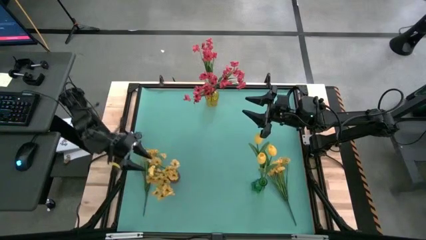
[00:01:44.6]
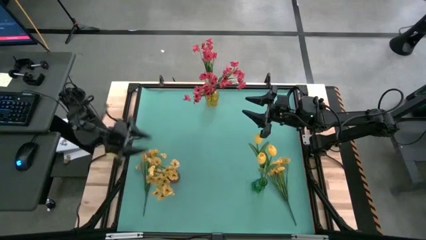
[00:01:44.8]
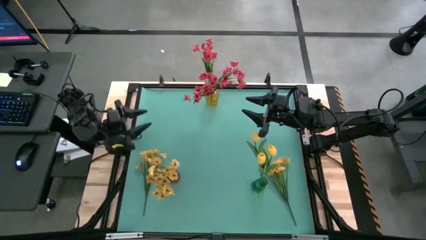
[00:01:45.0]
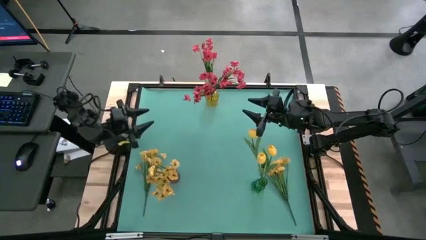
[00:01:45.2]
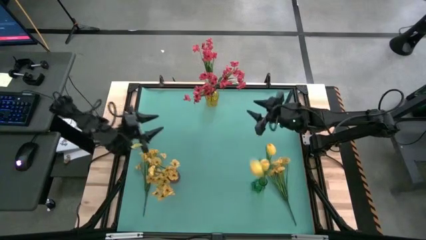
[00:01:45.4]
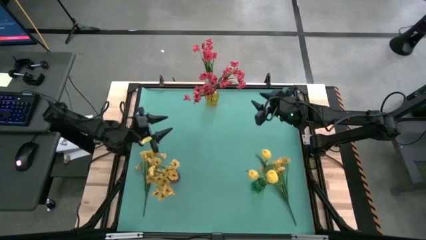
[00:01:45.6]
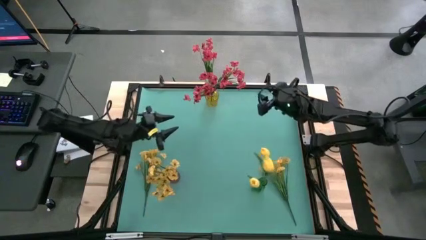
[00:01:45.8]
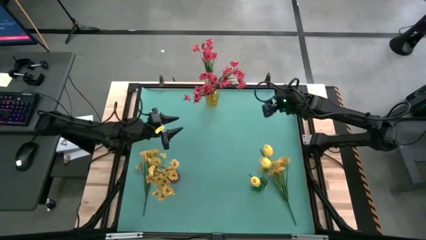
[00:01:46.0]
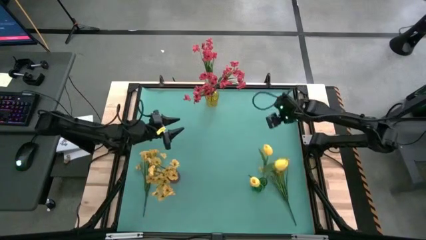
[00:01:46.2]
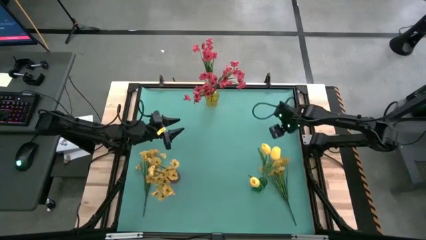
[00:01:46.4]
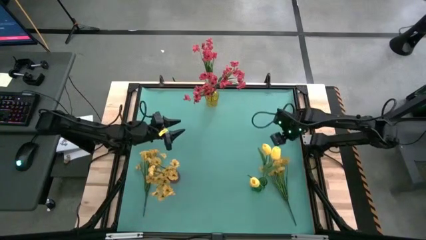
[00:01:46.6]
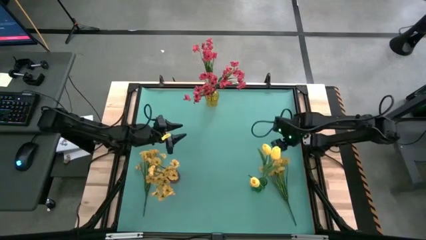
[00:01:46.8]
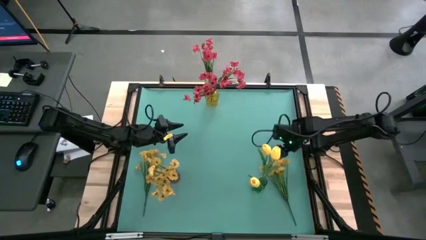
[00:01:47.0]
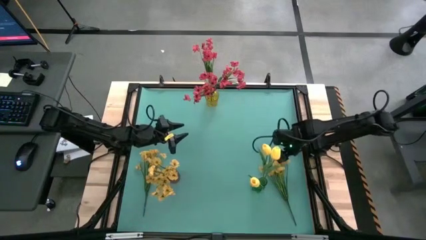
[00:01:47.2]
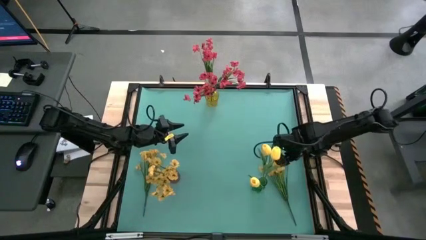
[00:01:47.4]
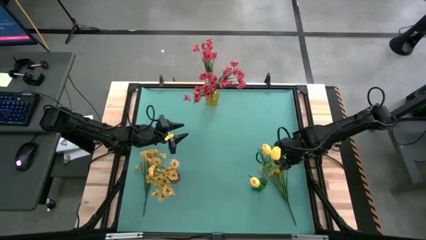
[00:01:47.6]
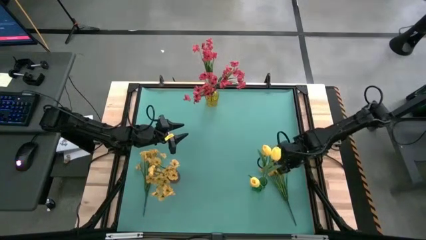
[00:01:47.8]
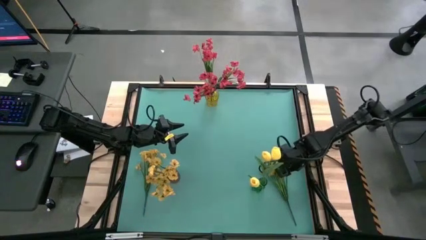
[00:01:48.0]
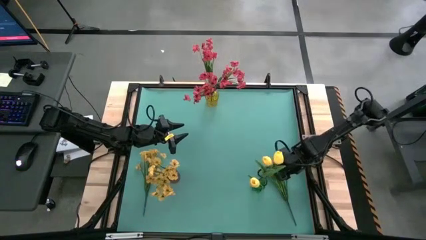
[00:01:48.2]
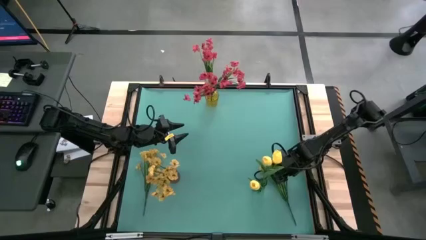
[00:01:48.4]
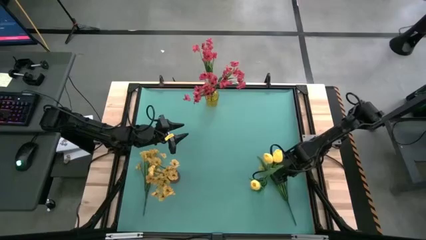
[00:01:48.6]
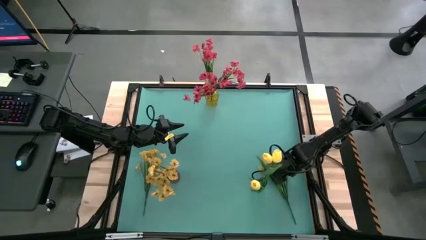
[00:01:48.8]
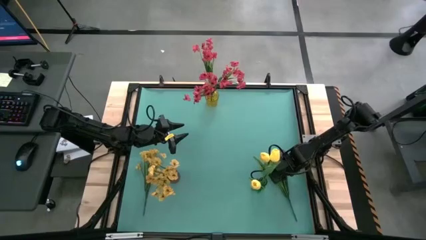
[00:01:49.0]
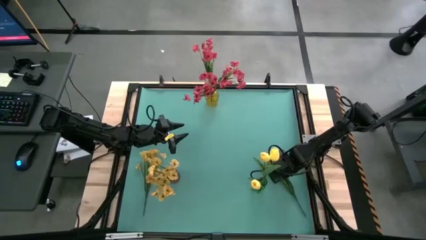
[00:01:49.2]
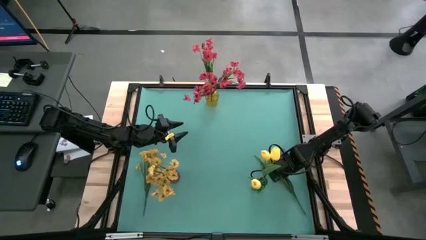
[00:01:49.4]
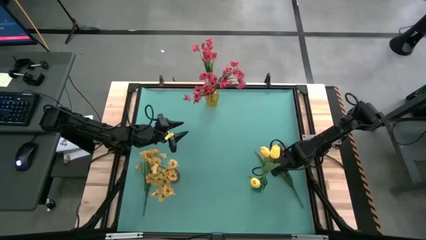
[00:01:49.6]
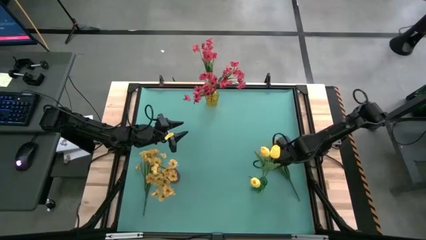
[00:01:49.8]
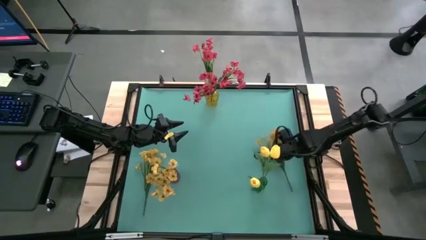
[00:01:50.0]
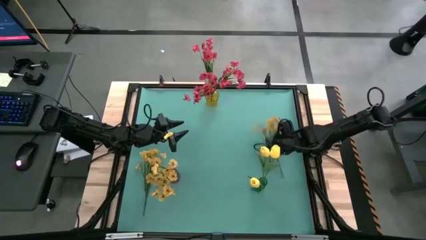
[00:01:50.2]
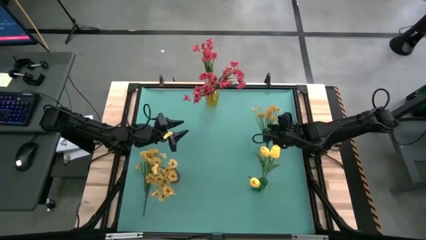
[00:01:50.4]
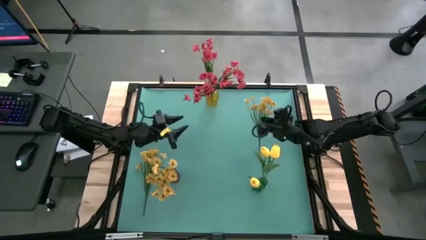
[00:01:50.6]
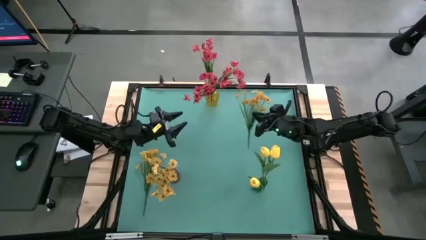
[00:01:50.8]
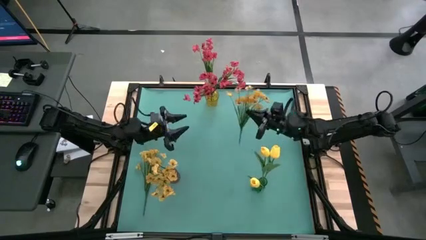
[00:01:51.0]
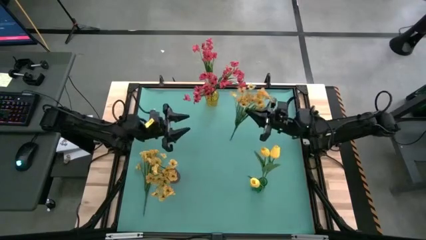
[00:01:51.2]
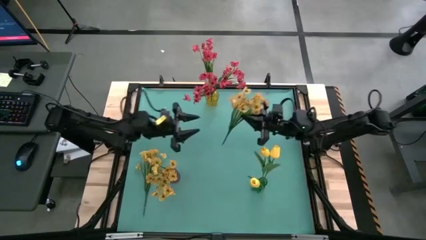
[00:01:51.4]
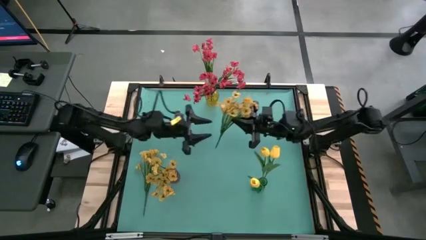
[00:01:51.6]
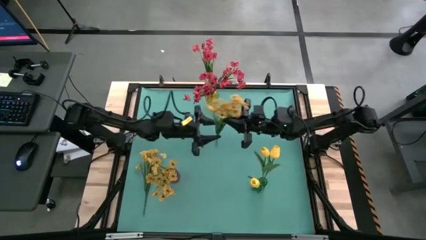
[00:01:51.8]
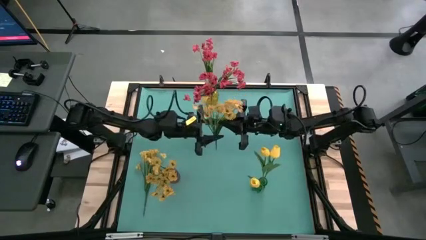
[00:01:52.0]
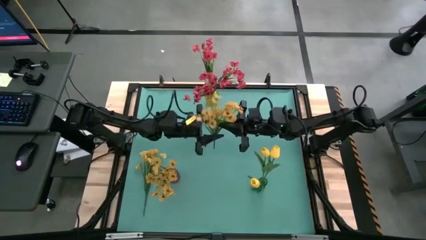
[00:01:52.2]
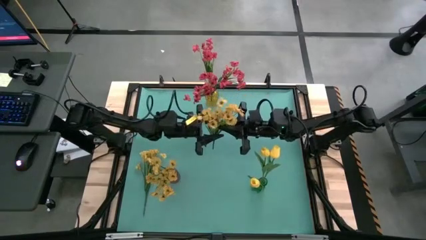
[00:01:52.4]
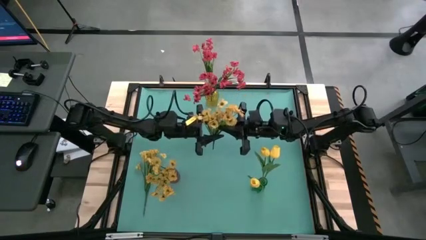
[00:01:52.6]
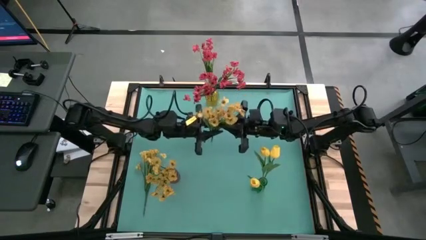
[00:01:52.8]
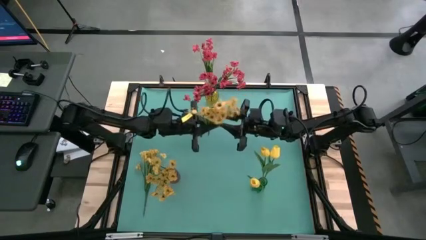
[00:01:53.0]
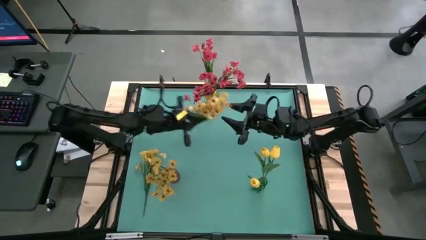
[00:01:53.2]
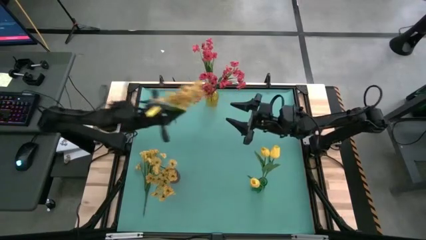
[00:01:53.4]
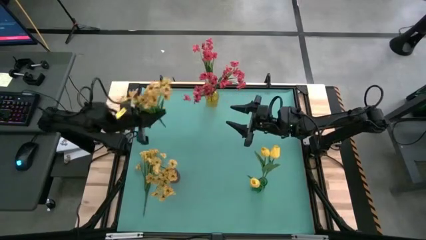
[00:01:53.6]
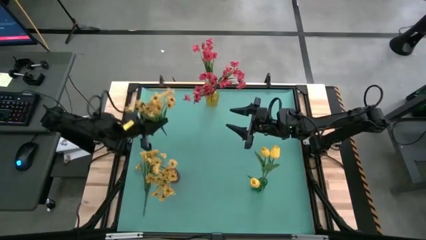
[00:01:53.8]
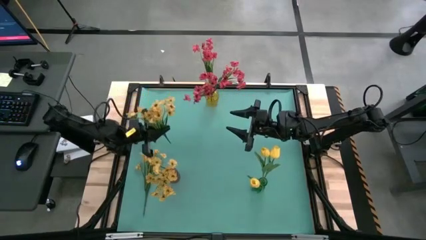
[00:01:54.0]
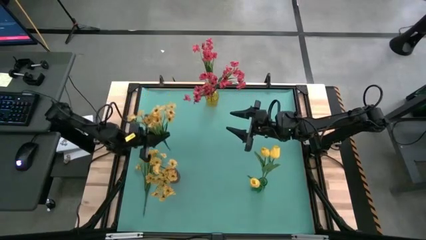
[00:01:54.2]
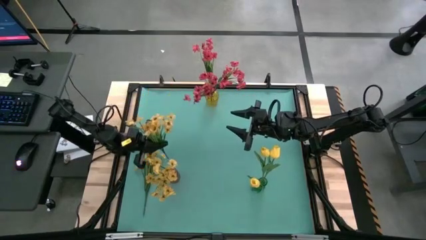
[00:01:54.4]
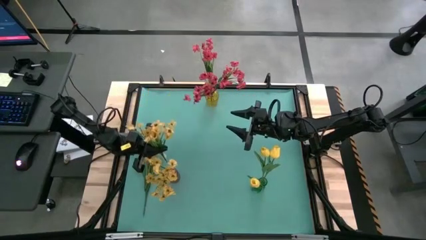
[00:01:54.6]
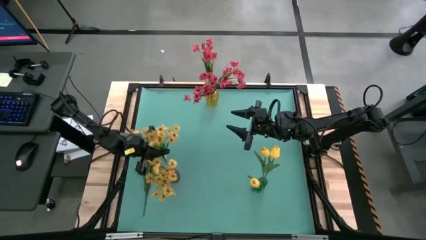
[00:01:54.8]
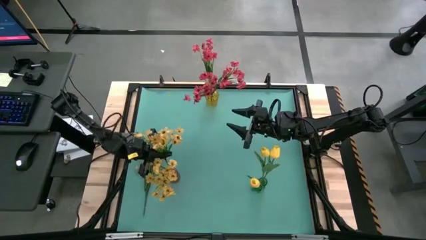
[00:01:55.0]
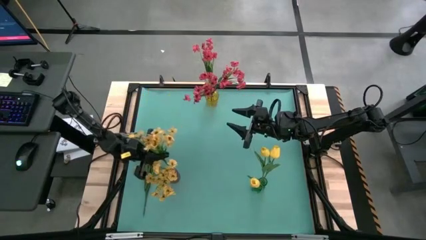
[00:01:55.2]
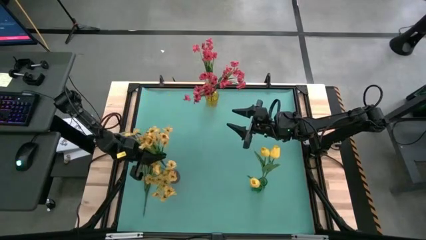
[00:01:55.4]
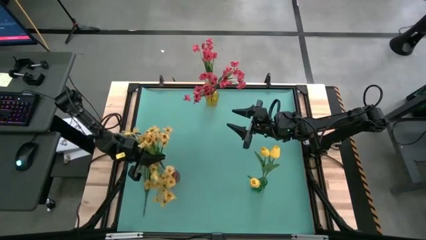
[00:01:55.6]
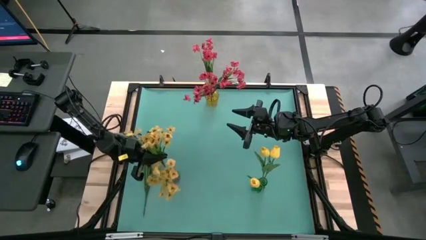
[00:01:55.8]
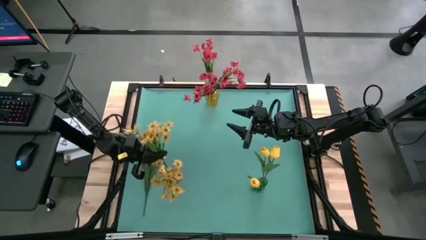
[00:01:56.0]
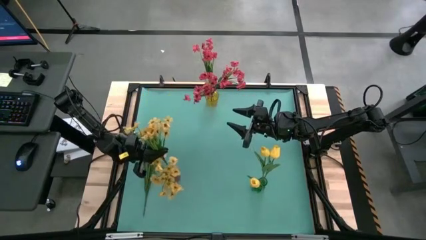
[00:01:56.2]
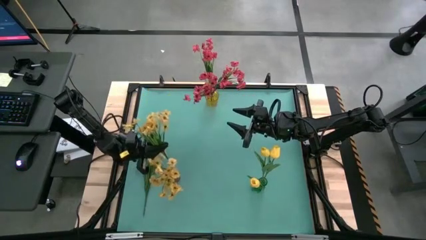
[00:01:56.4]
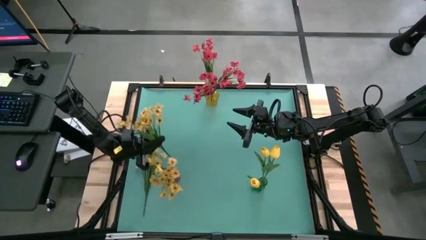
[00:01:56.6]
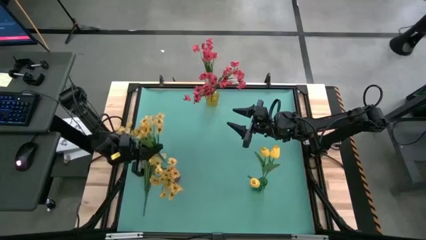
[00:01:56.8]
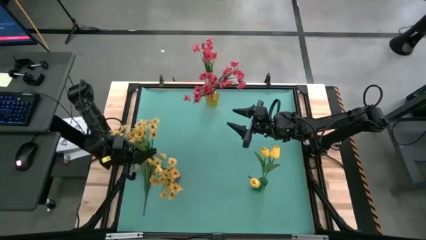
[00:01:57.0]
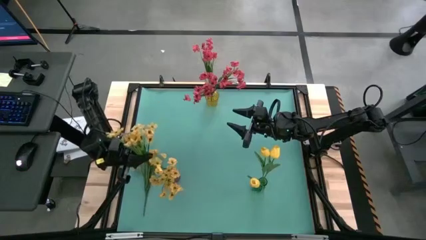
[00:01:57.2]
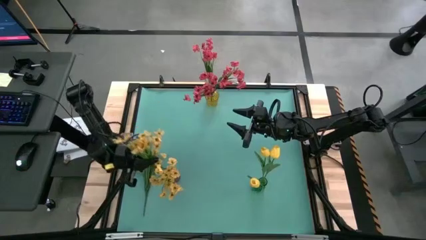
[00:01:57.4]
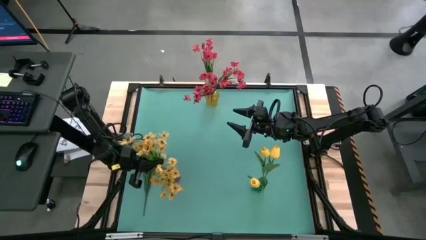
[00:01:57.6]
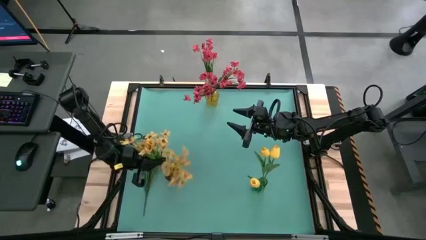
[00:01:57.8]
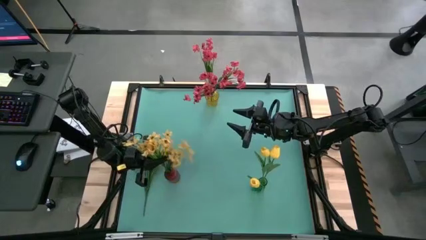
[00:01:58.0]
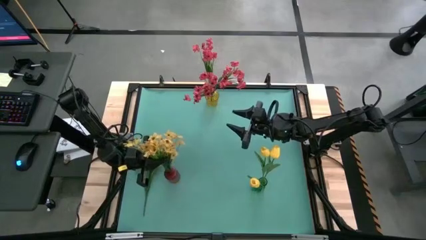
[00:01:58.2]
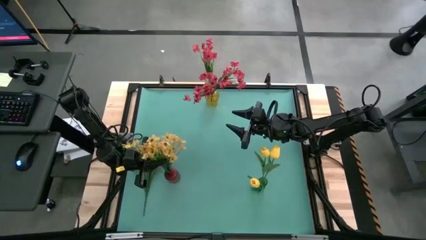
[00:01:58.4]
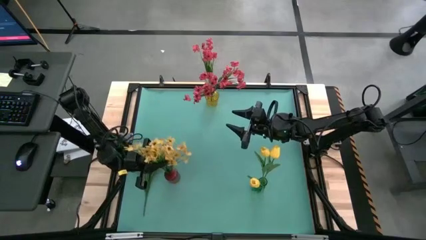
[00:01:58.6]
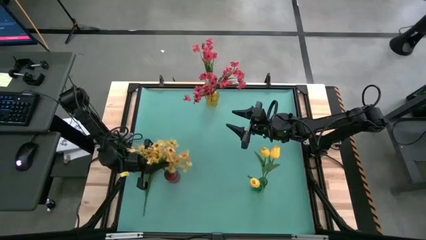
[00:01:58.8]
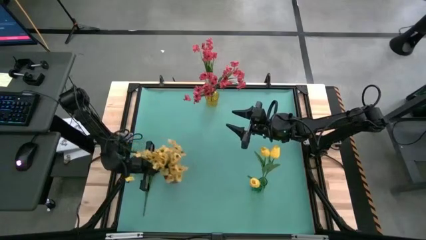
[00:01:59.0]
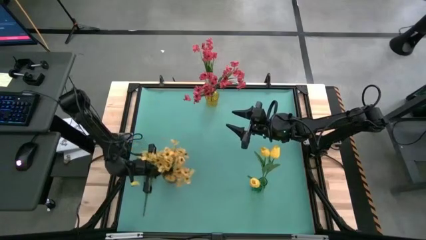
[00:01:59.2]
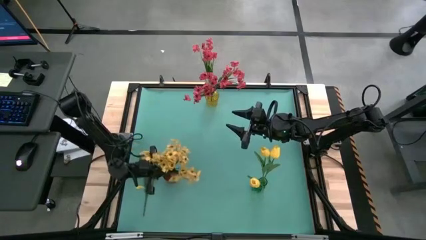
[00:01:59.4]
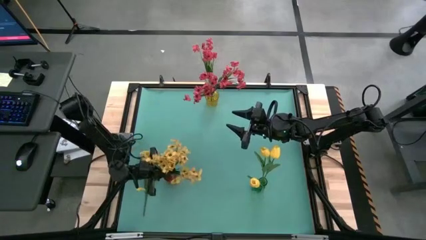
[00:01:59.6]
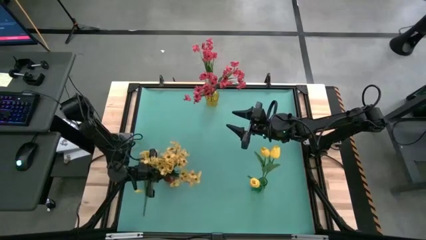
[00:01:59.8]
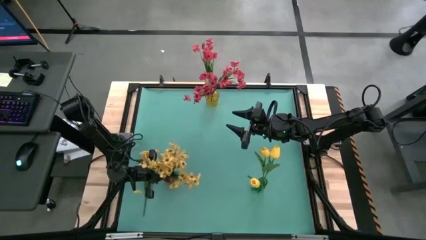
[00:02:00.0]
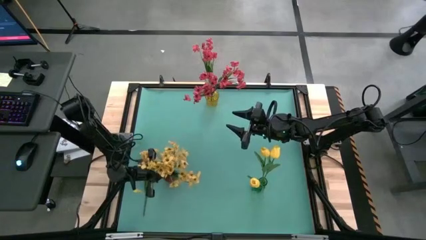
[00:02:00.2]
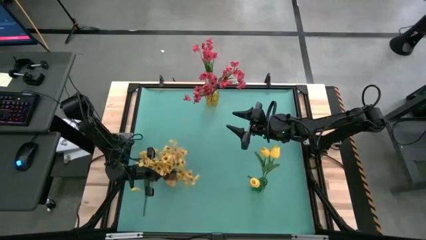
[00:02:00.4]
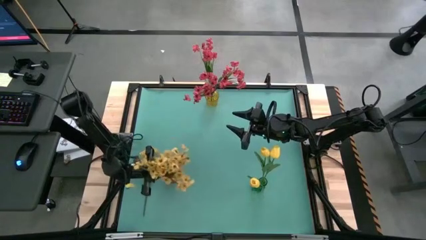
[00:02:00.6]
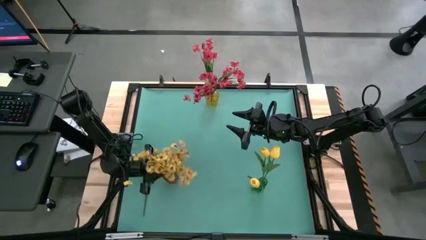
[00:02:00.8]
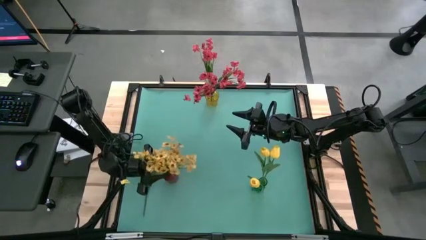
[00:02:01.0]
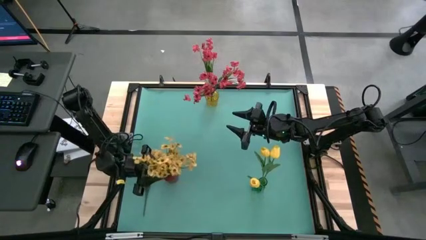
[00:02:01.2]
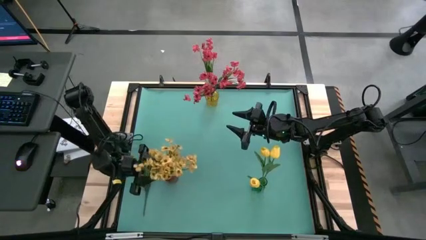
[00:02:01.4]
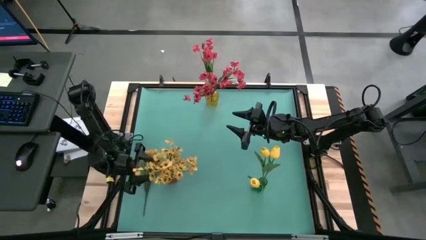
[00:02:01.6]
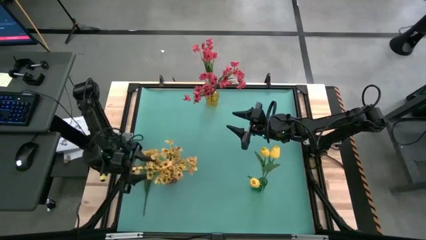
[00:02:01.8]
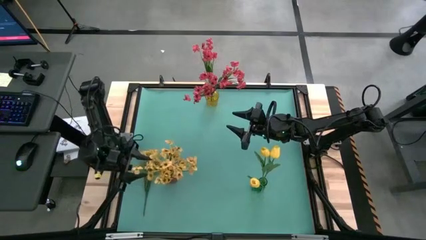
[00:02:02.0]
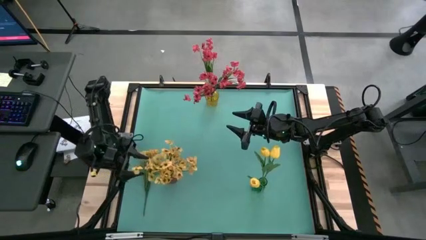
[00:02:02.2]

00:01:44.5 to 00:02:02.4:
Task: Sort flowers into vase by color
Put the right yellow flowers into the red vase
